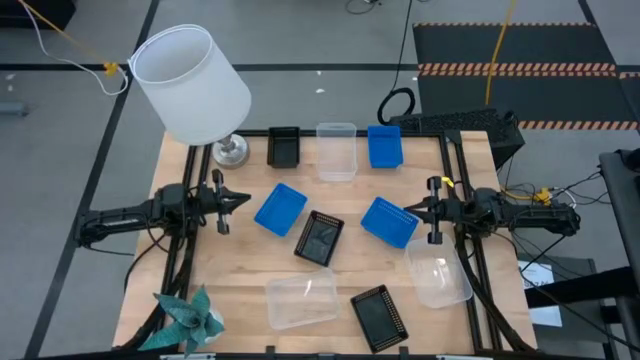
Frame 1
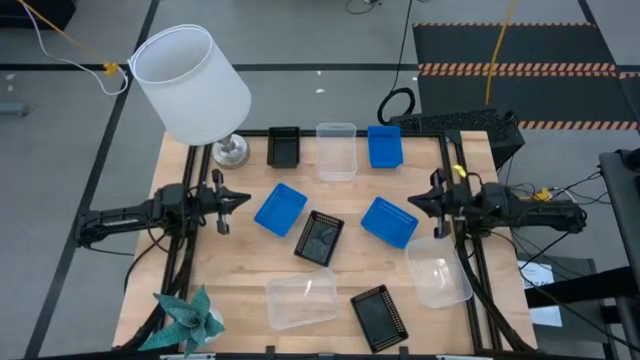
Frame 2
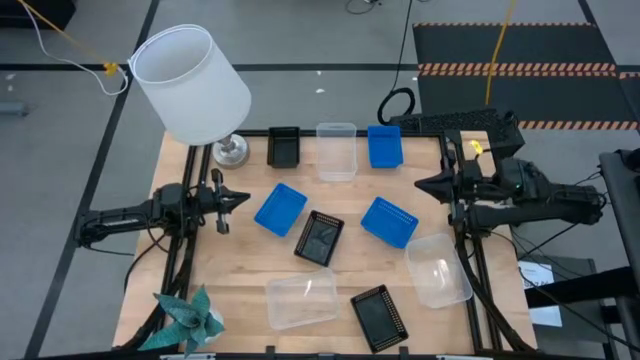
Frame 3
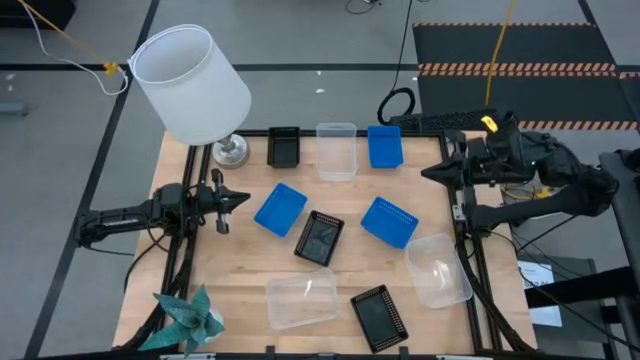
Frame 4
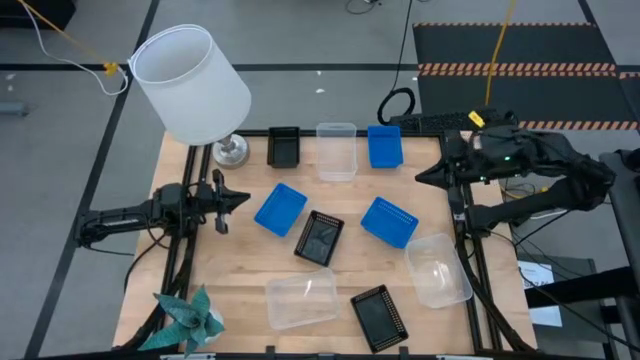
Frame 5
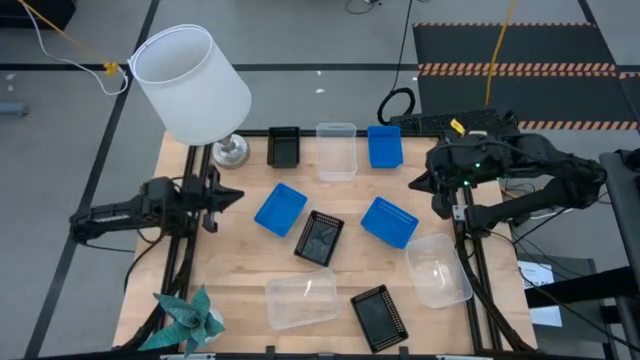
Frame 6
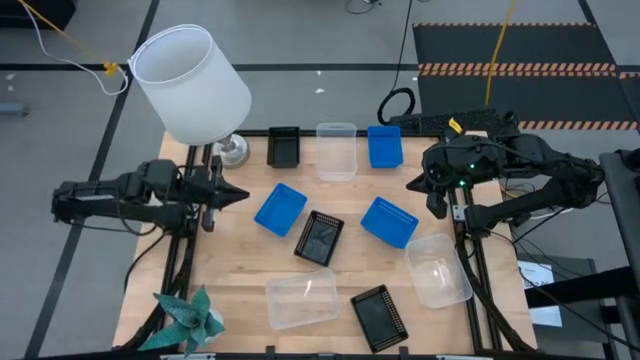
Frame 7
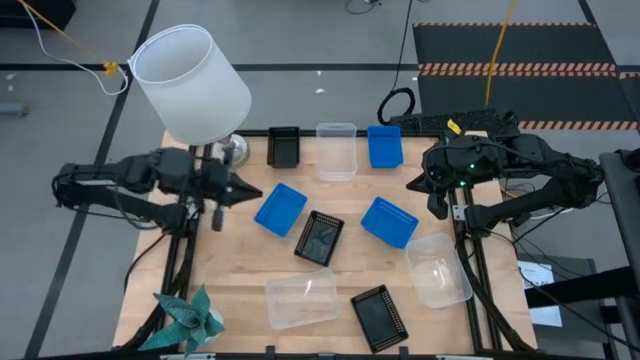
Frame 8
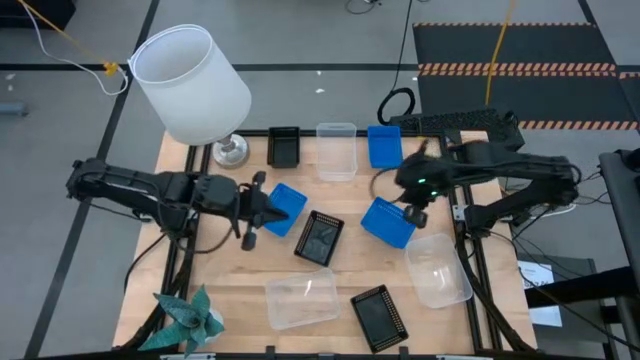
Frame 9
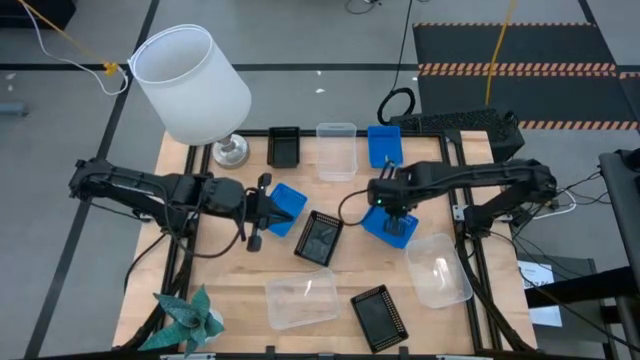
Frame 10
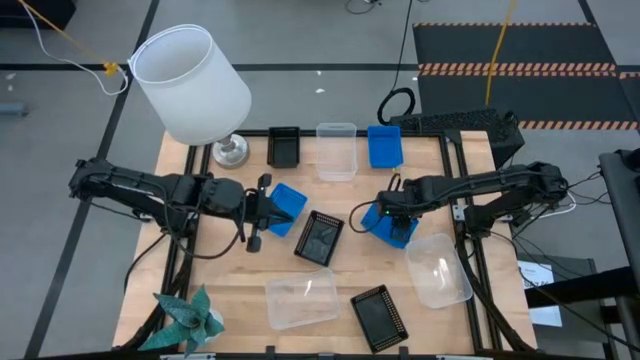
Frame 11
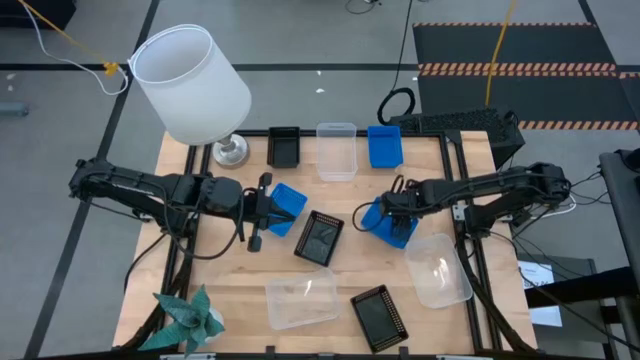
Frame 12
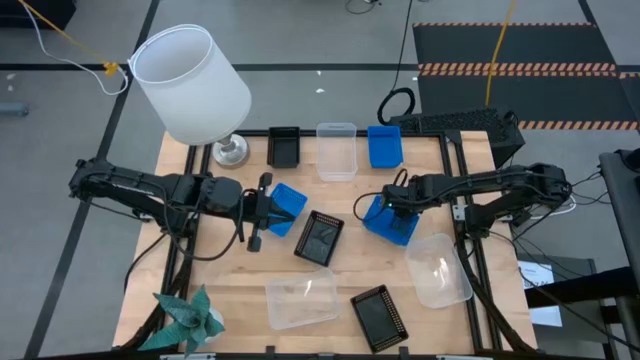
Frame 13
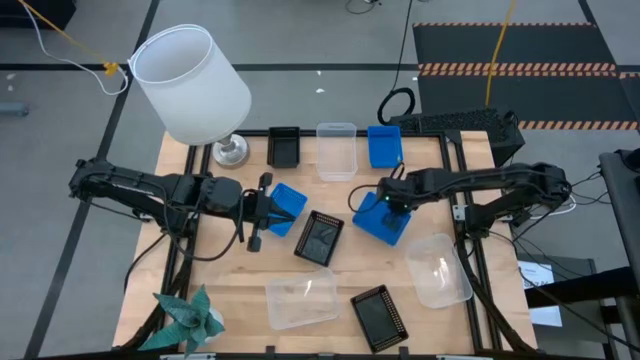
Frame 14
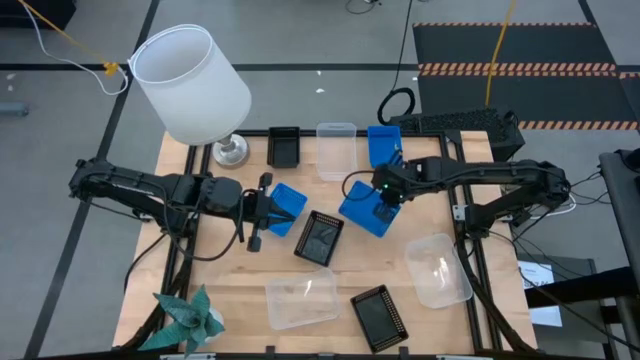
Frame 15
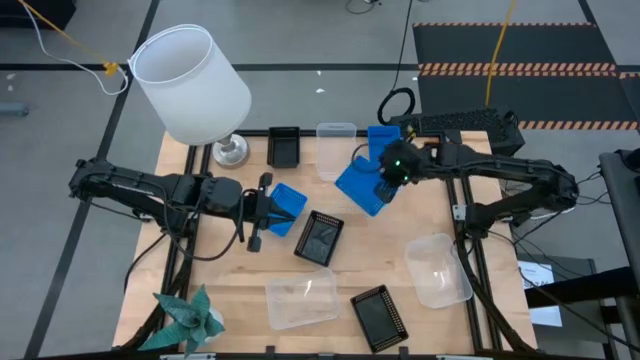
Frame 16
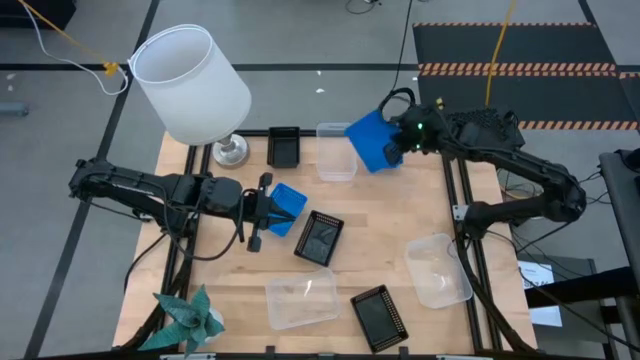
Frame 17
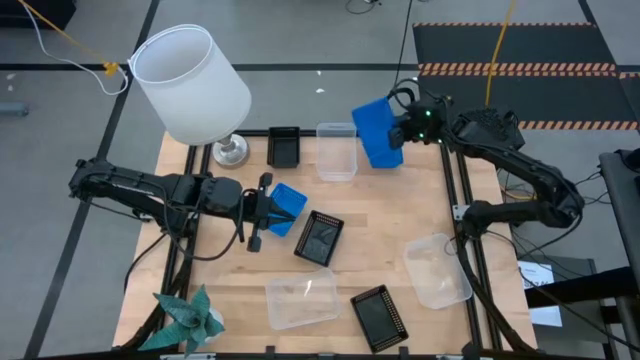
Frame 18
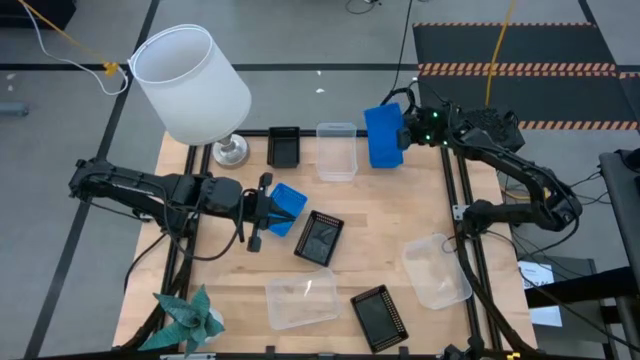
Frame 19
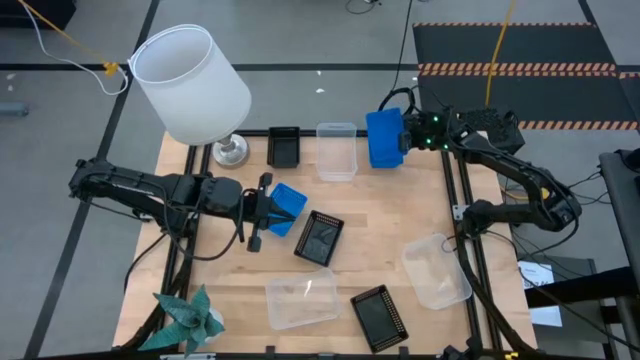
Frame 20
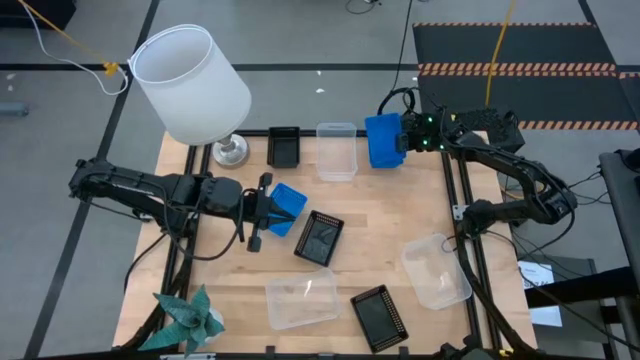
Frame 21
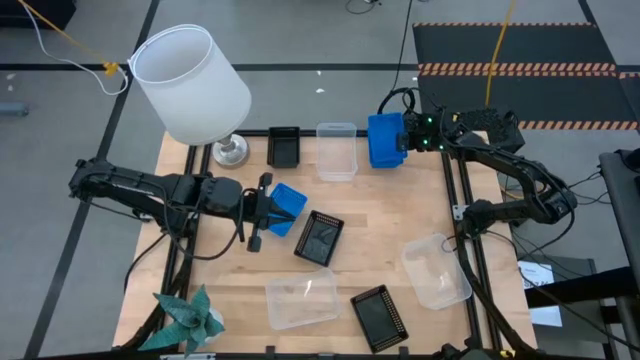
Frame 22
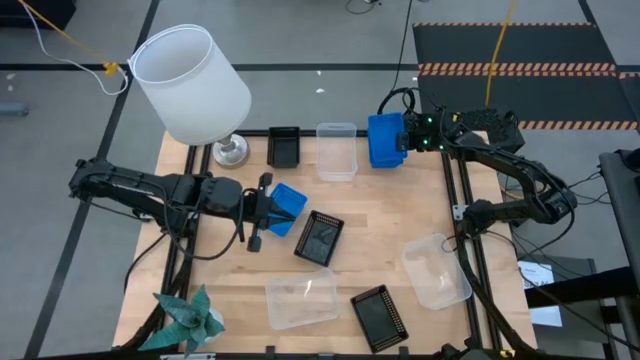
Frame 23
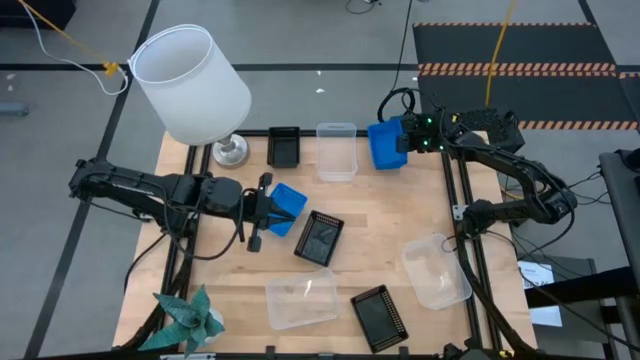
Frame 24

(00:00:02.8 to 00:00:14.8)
Stack the bottom right blue bin on the top right blue bin

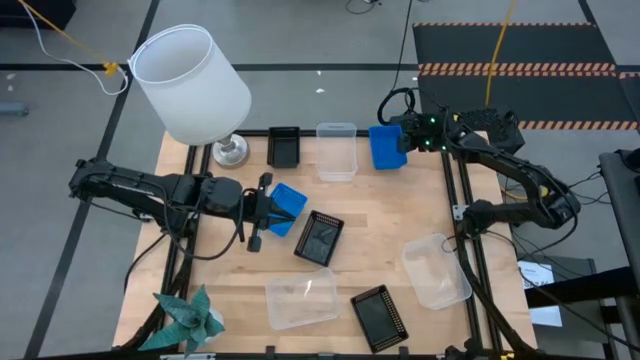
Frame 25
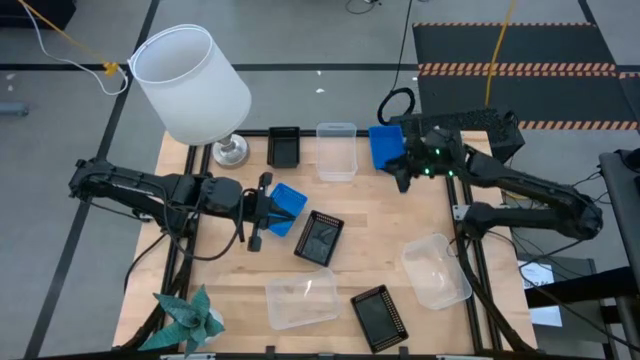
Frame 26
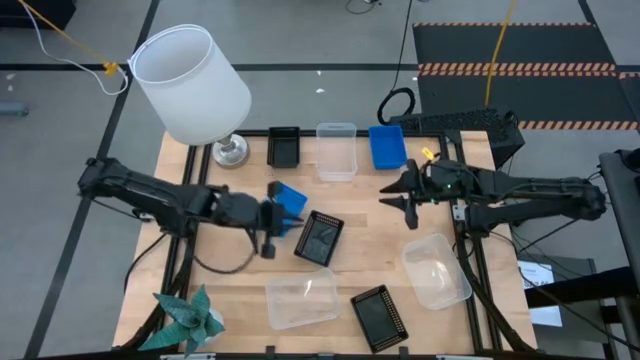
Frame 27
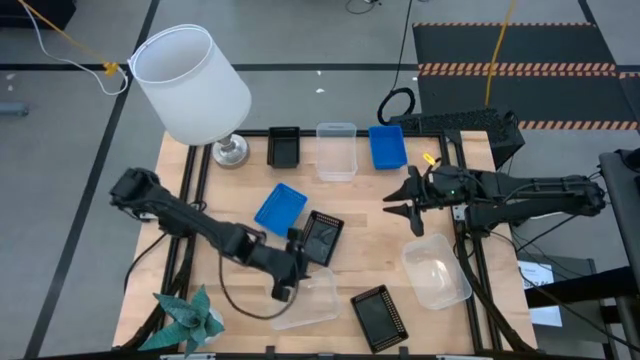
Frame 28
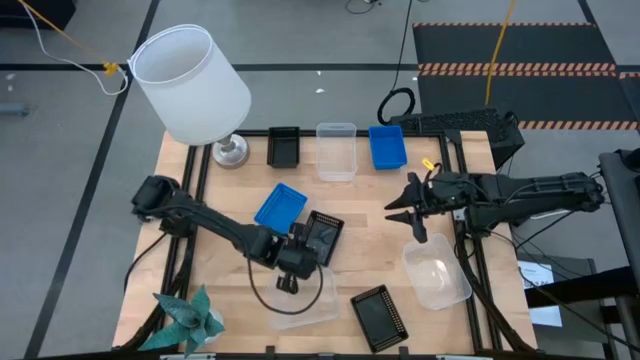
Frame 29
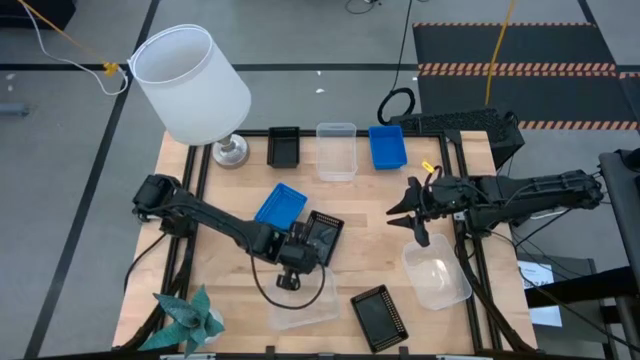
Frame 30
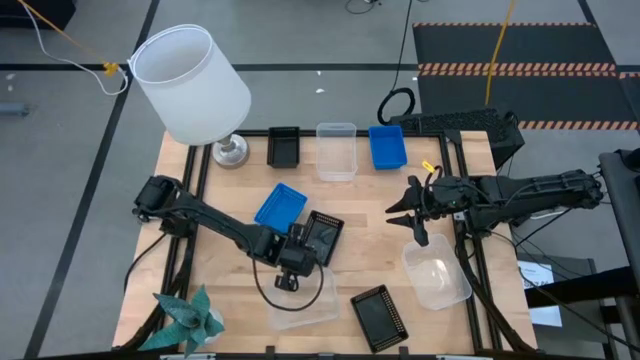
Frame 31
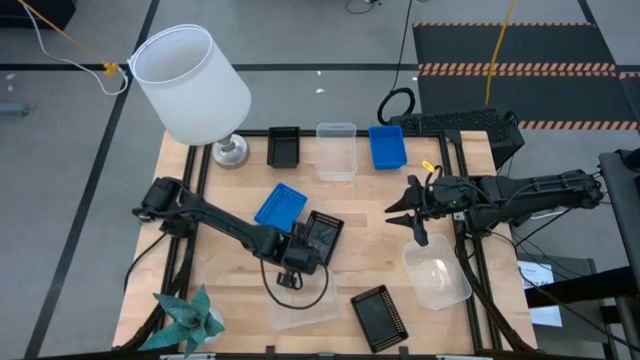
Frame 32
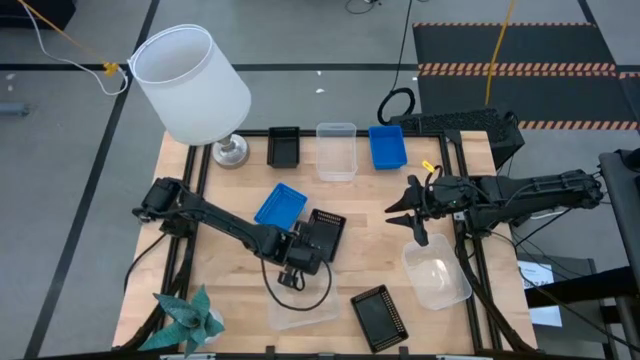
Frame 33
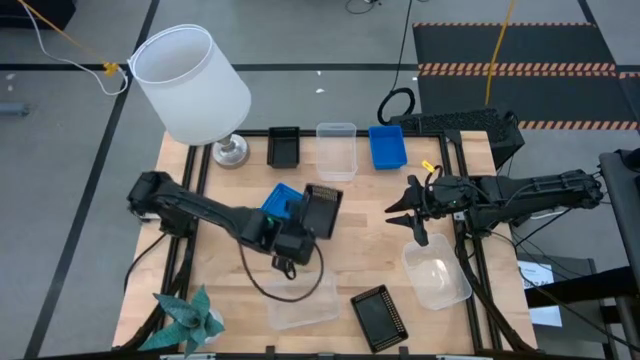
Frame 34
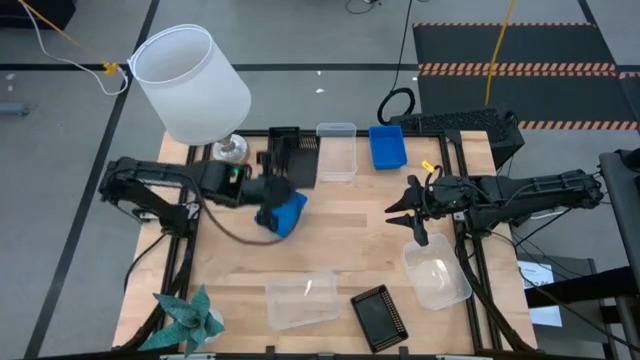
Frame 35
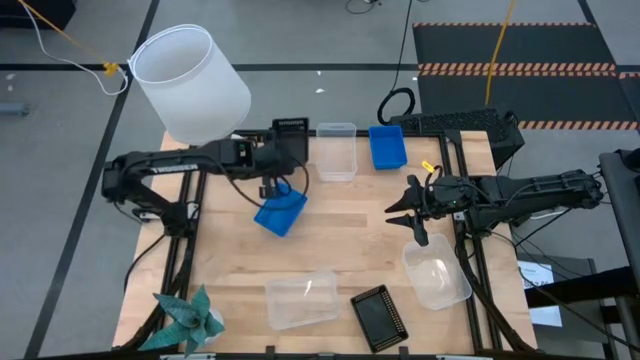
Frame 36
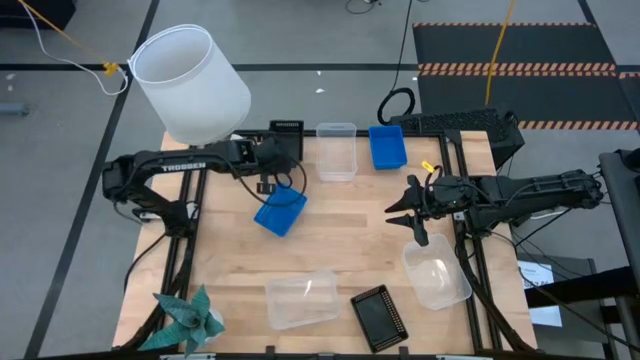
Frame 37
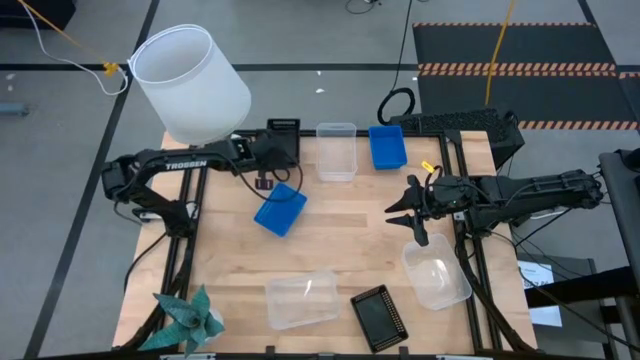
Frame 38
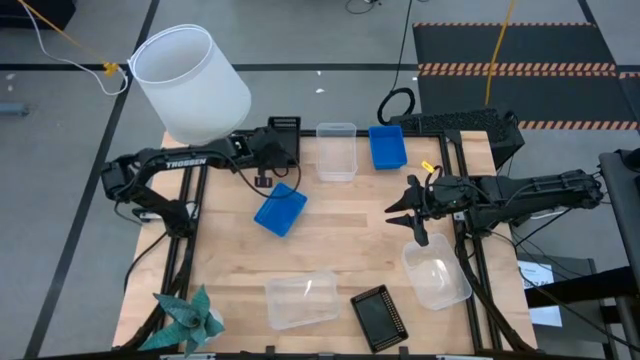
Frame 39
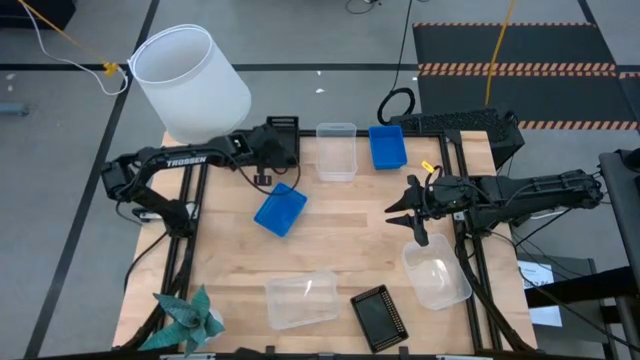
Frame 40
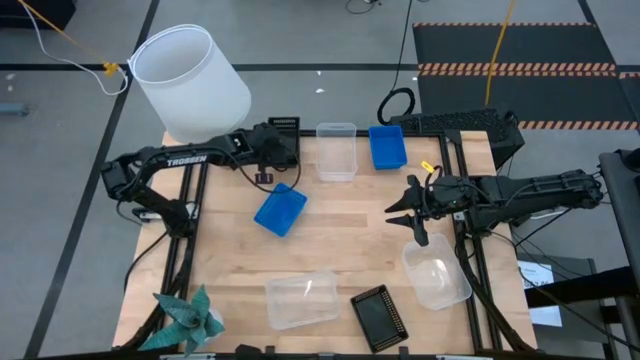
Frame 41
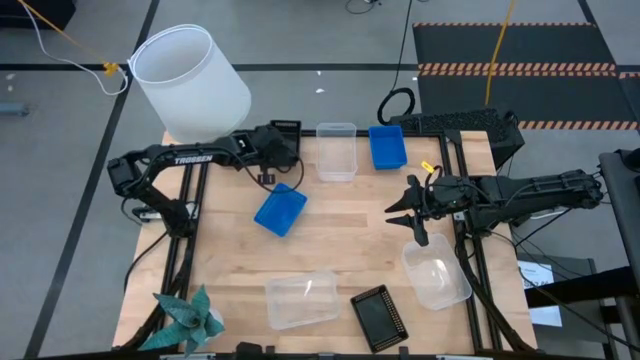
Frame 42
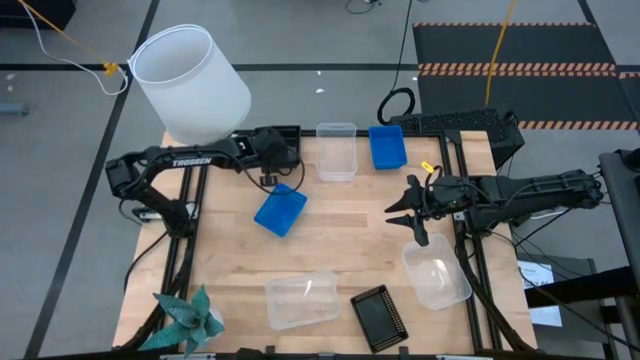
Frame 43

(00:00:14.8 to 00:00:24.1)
Stack the middle black bin on the top left black bin
